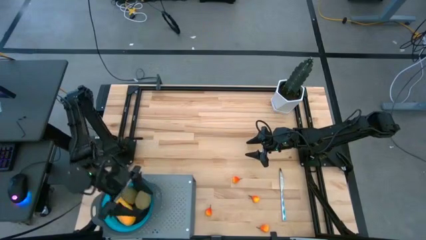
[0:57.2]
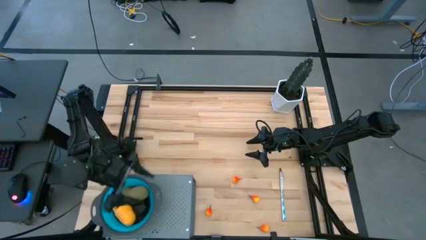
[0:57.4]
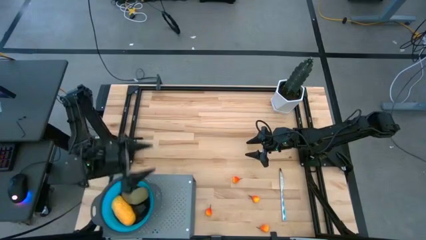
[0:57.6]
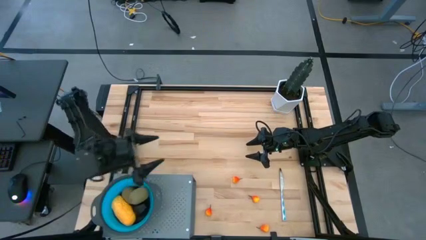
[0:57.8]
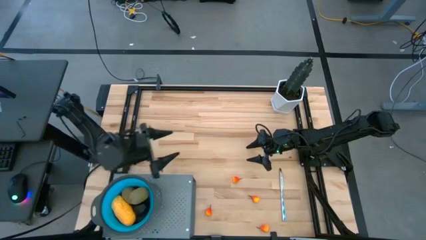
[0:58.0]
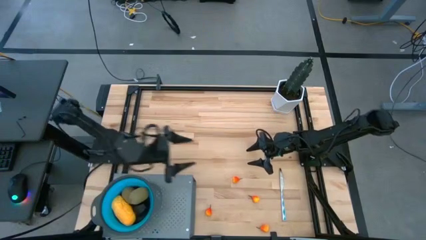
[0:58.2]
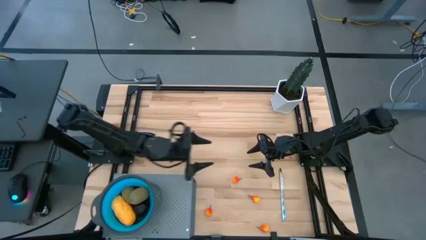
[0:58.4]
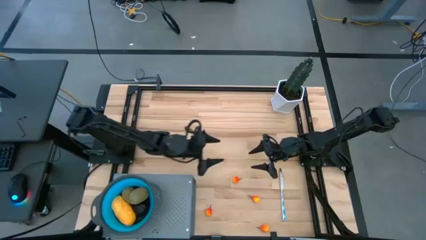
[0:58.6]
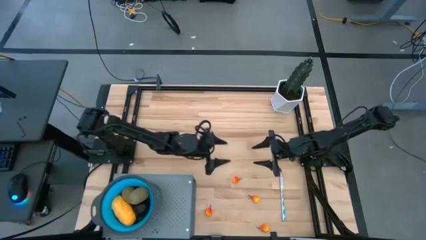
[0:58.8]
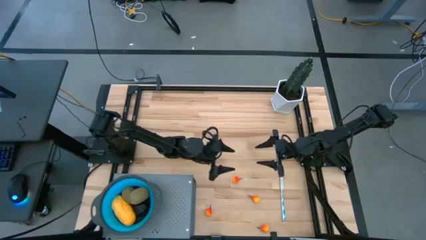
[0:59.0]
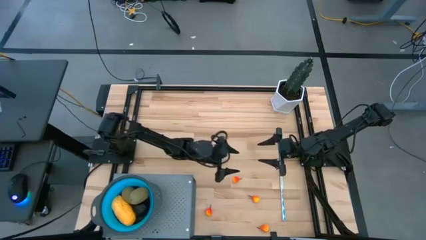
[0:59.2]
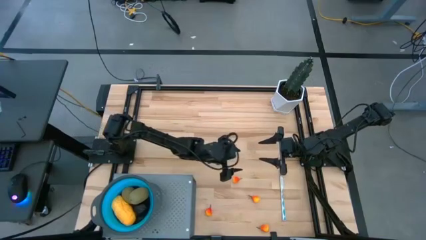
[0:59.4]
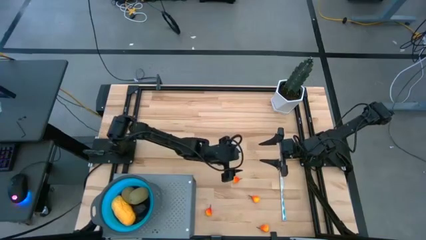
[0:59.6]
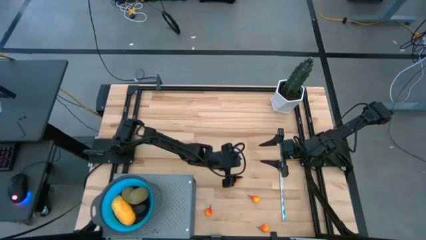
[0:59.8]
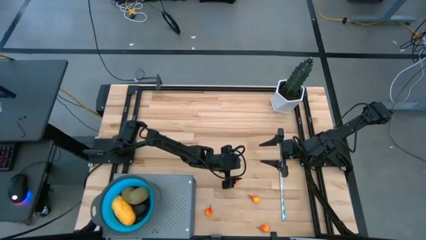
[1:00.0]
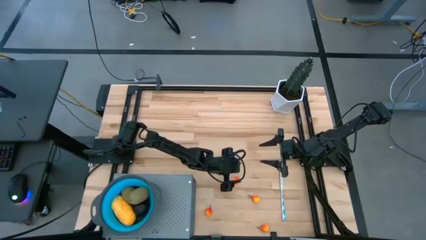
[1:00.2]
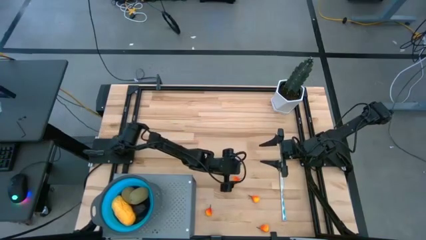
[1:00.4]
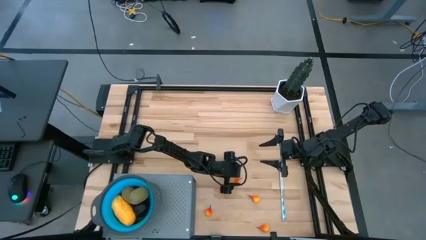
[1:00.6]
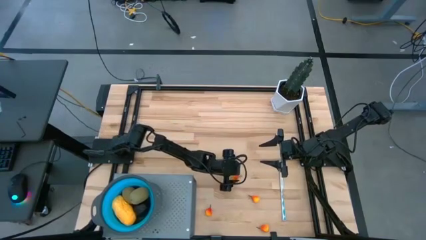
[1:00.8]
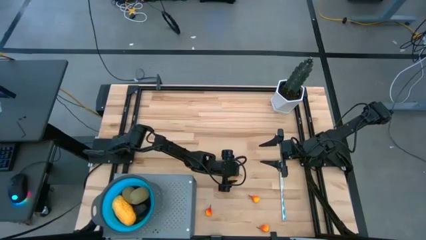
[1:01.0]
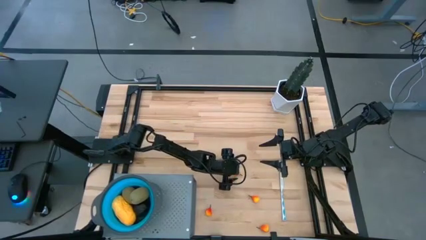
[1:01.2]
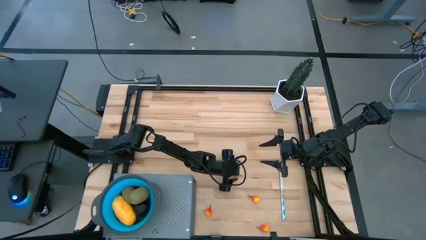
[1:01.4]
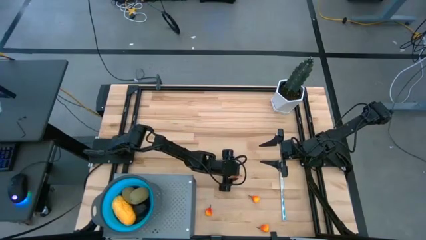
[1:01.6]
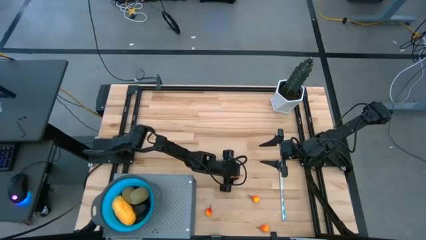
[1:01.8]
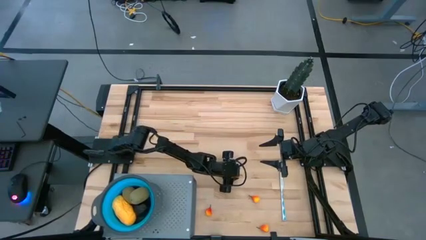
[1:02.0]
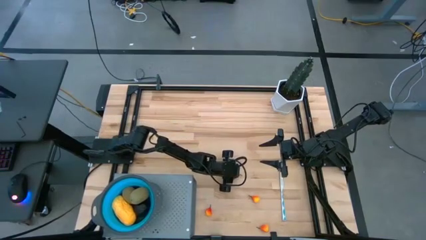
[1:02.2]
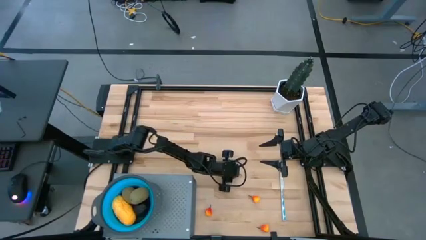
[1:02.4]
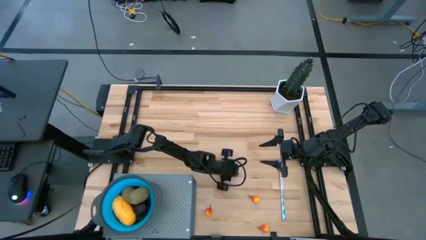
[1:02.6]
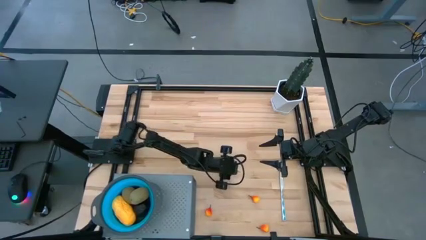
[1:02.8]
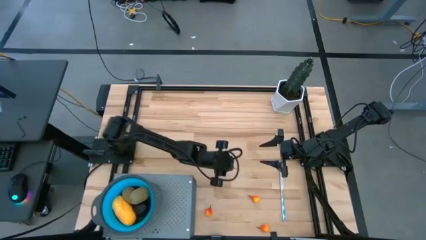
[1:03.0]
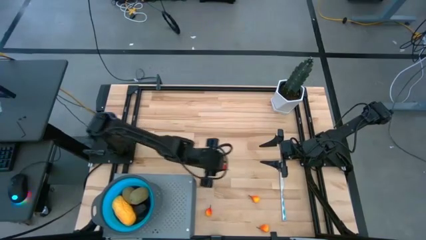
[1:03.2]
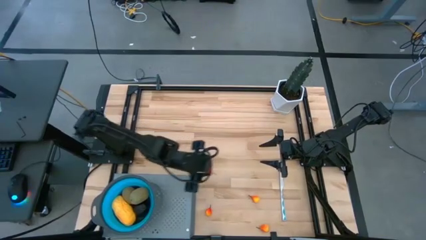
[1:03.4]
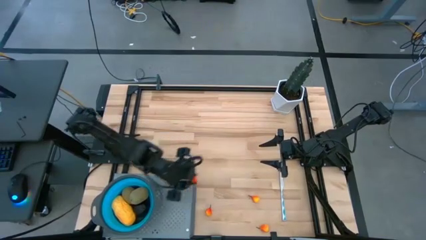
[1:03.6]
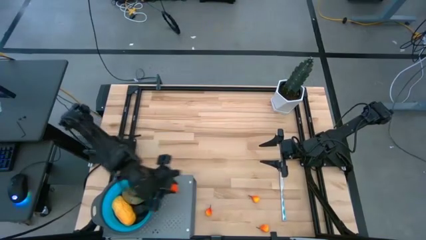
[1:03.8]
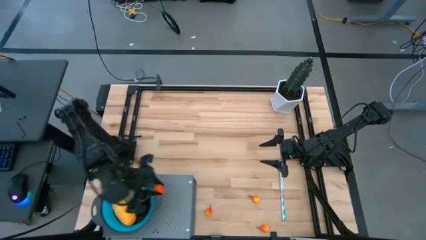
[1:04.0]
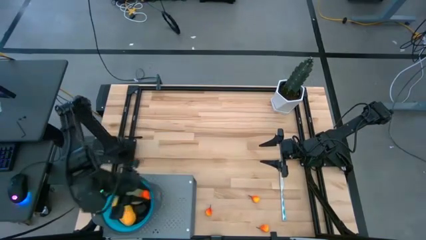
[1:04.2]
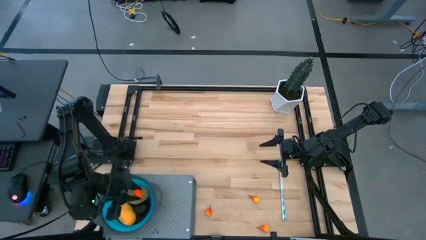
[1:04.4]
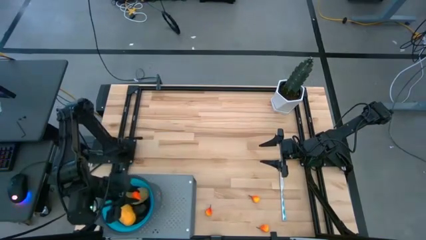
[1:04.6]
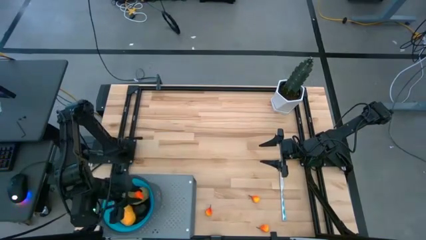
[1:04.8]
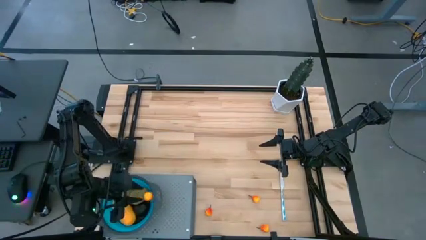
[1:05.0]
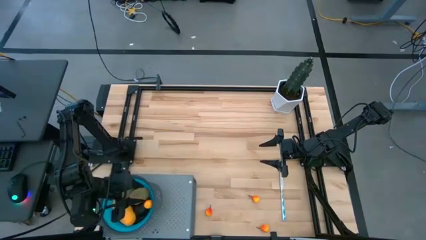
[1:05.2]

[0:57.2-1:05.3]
Task: Pick & Place Fruit
Put the pear into the strainer bowl

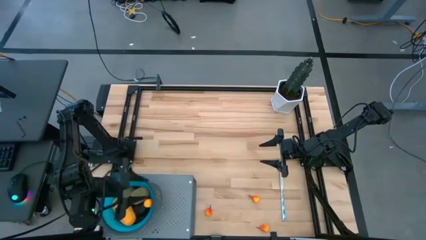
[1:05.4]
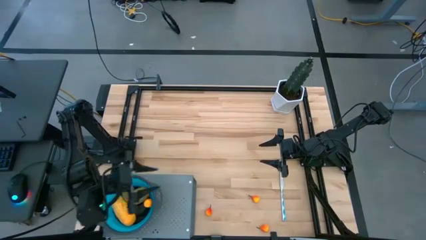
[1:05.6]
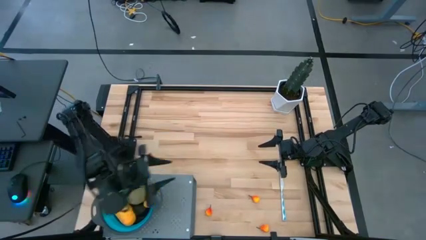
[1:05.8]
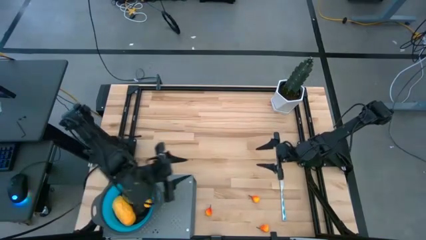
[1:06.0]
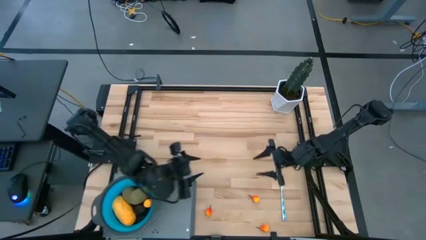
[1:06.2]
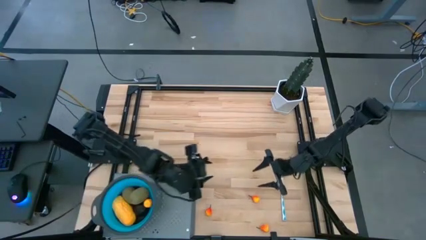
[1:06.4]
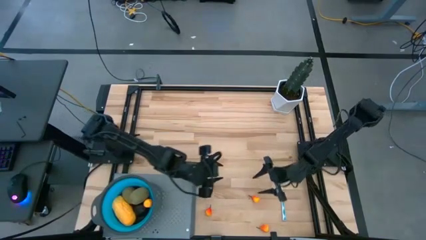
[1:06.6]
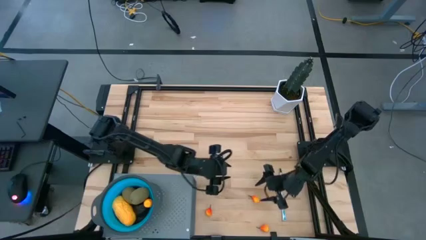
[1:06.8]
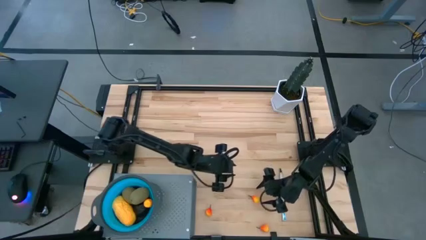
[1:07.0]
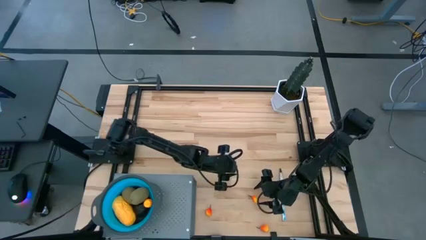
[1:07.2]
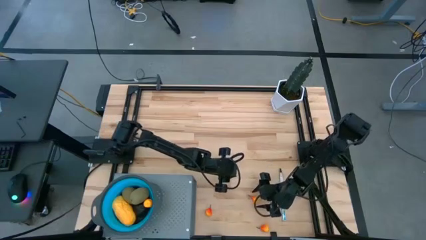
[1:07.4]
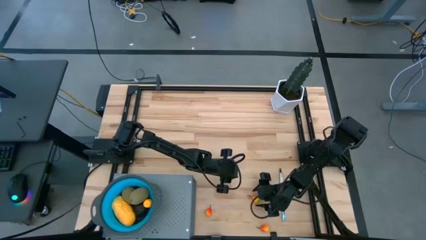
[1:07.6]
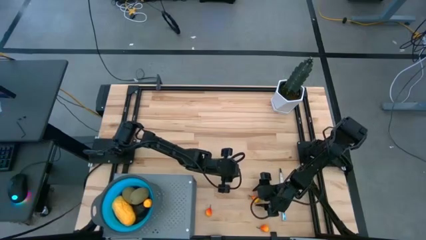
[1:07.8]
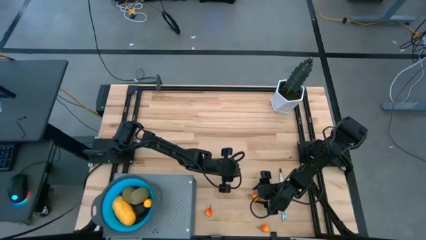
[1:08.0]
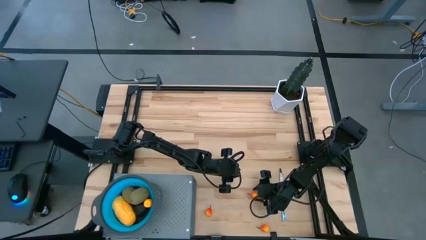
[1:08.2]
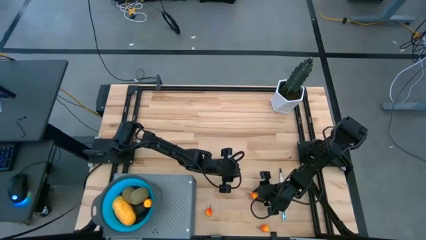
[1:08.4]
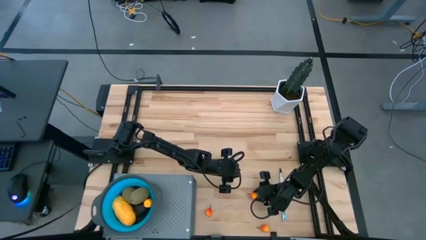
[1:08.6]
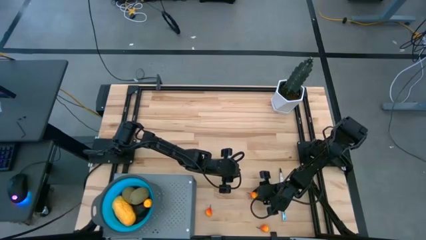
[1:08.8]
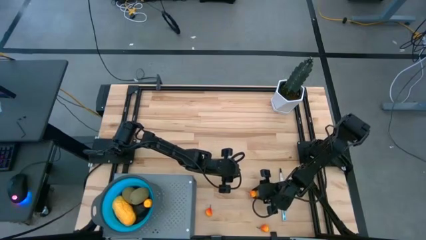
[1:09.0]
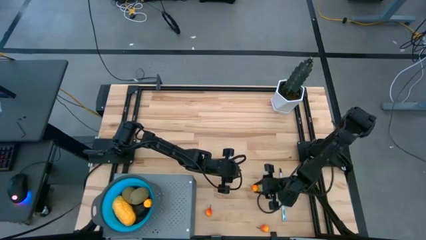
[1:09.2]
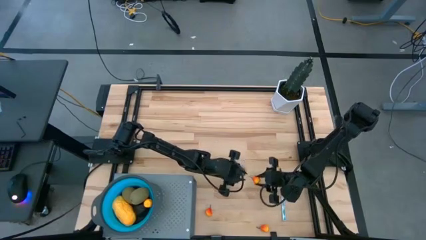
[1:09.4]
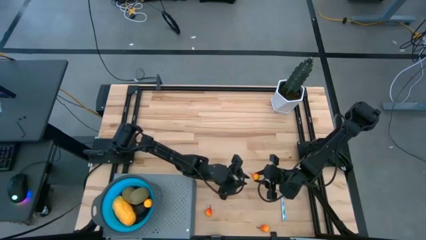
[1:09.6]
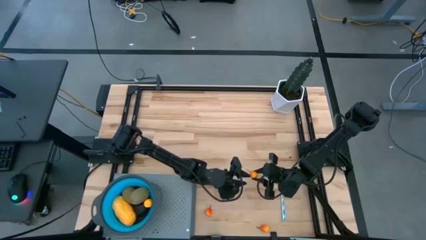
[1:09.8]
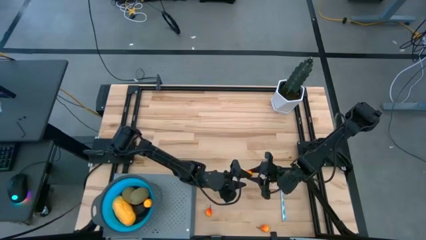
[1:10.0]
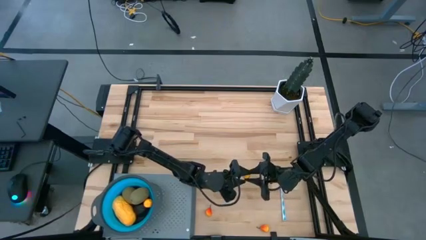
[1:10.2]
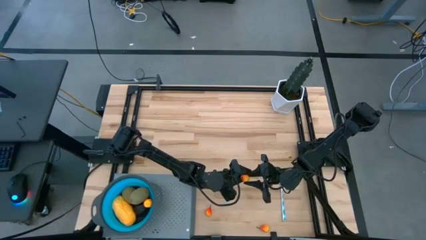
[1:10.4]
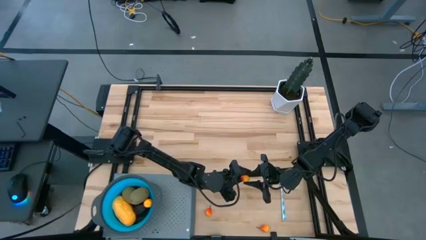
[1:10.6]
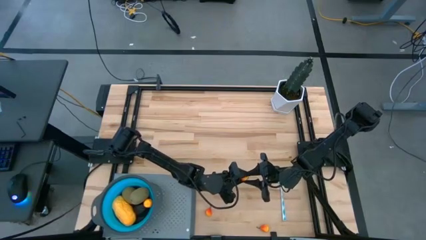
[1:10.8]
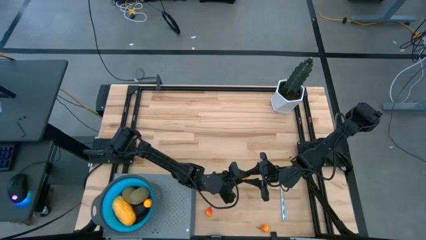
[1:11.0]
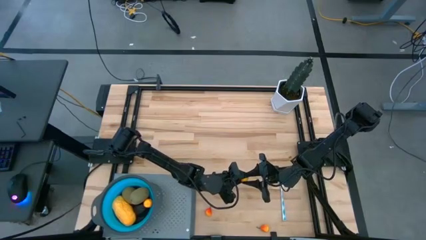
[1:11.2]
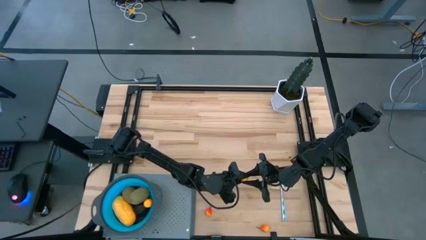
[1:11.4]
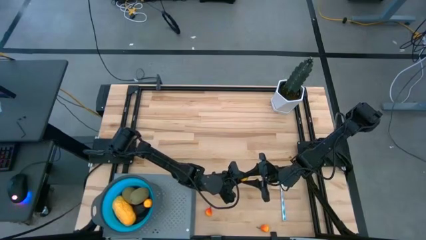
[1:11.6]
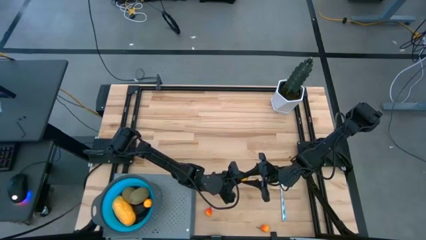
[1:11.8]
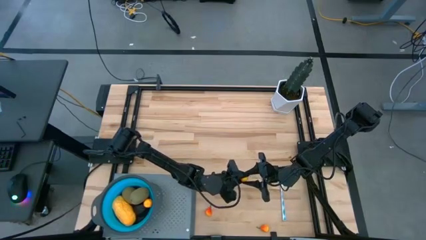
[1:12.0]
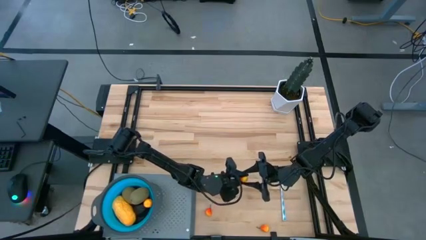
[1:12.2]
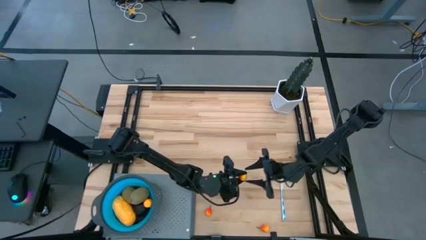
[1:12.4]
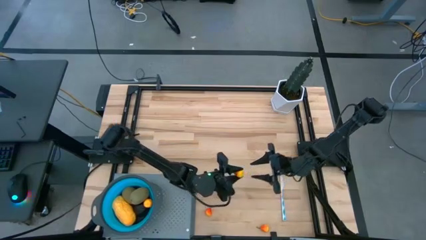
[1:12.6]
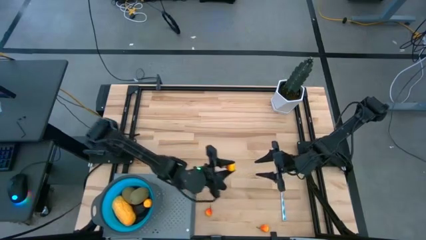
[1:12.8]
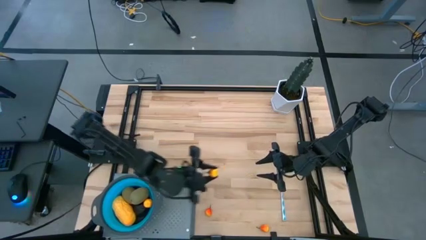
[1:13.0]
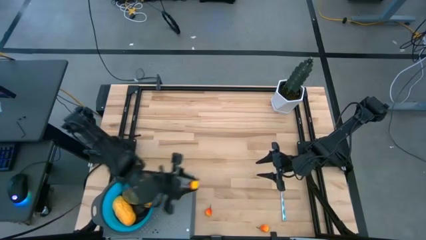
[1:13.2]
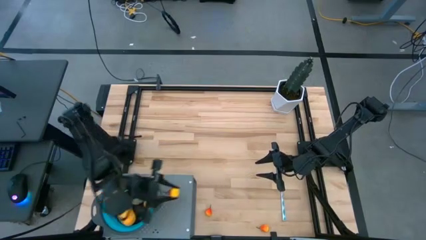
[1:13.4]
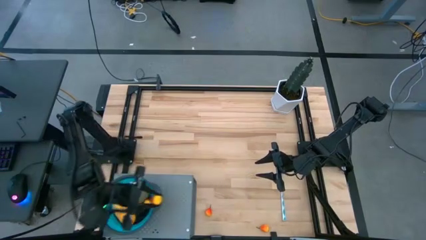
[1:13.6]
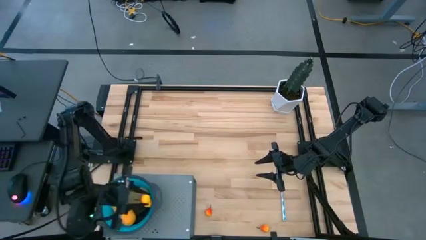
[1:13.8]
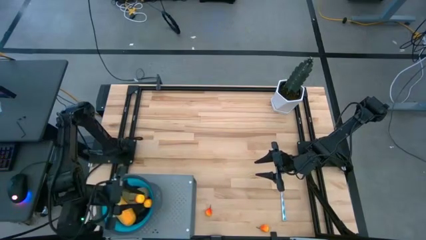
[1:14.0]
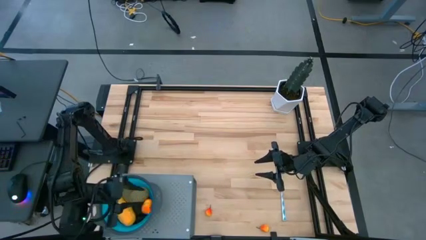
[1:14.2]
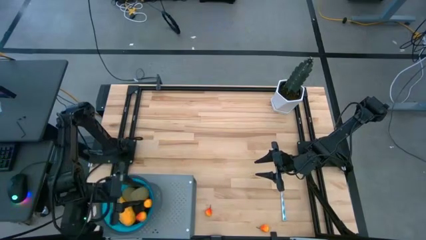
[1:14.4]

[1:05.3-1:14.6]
Put the pear into the strainer bowl
